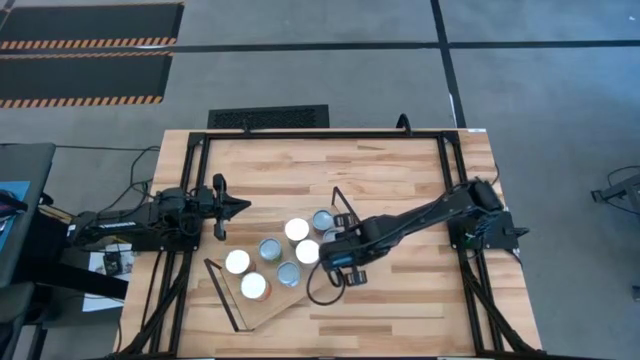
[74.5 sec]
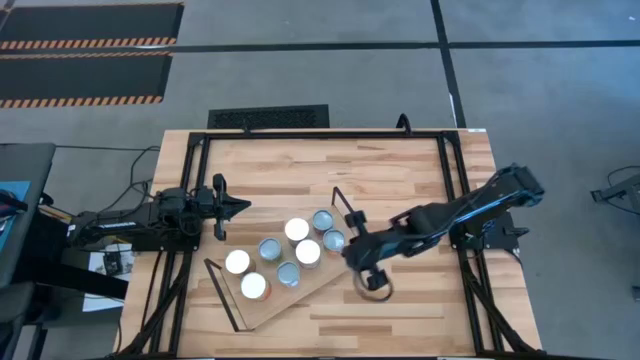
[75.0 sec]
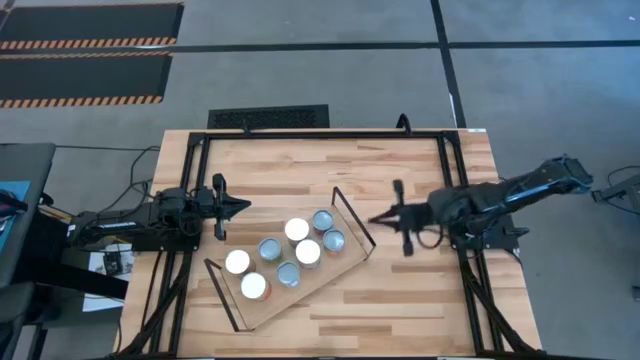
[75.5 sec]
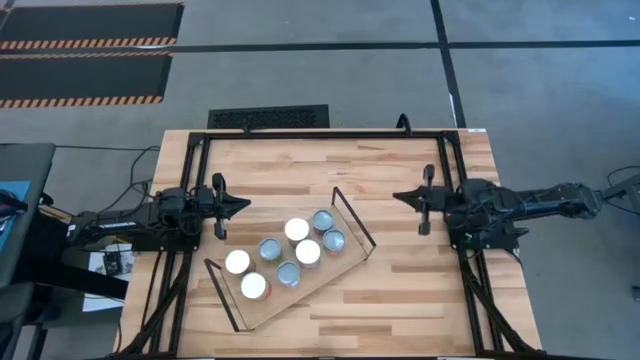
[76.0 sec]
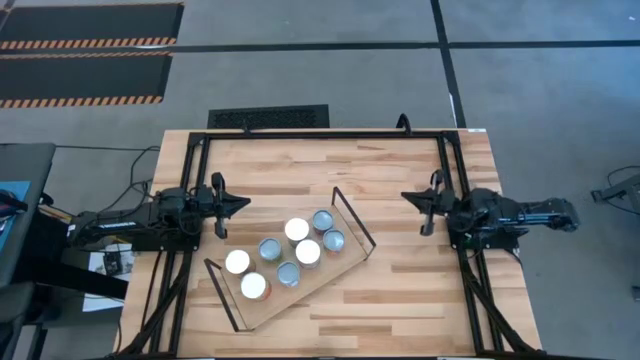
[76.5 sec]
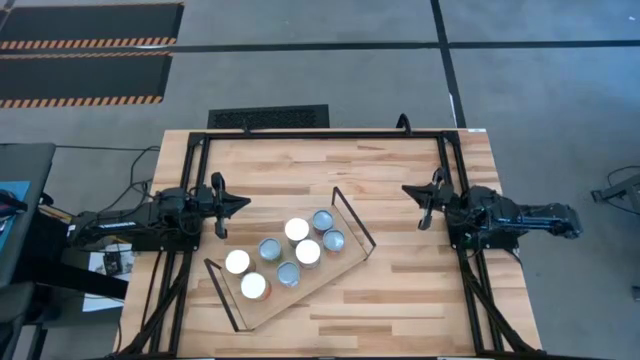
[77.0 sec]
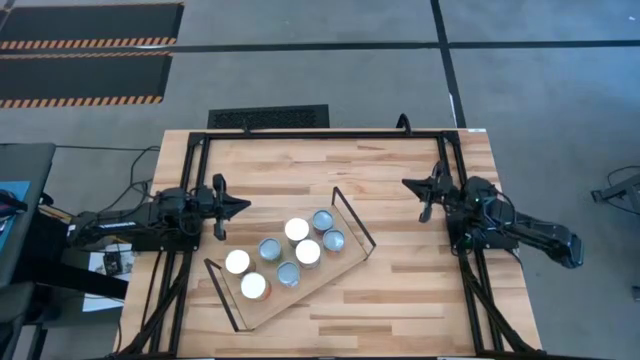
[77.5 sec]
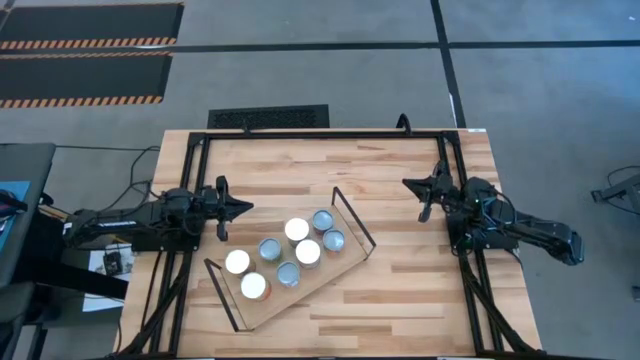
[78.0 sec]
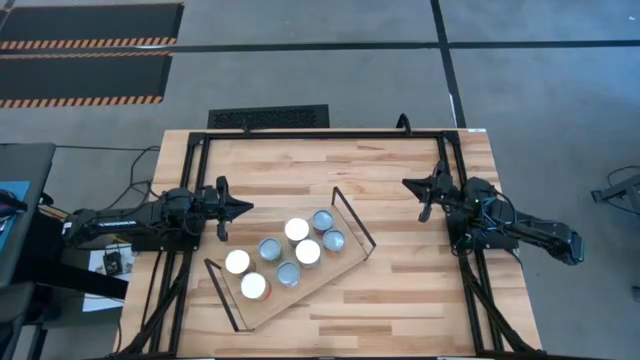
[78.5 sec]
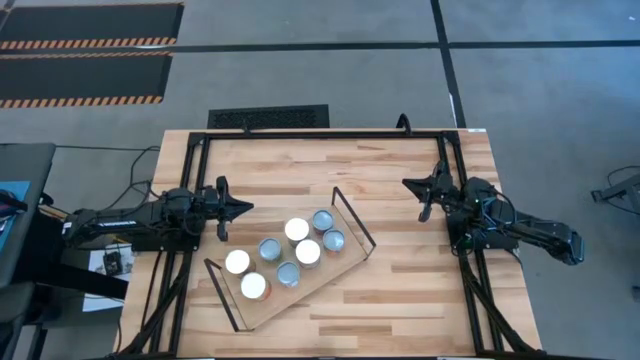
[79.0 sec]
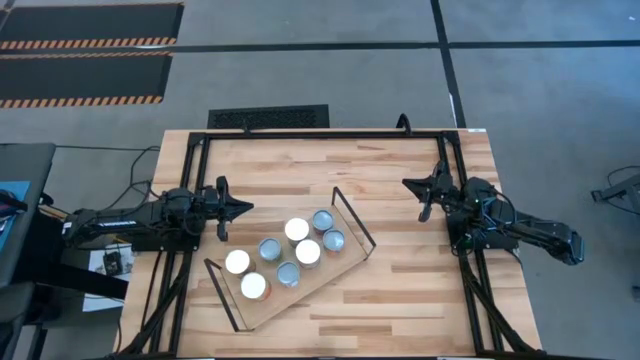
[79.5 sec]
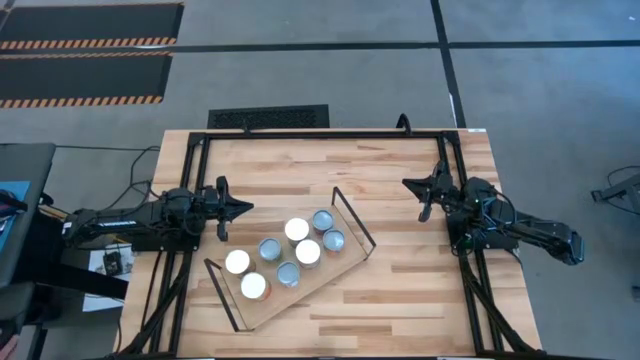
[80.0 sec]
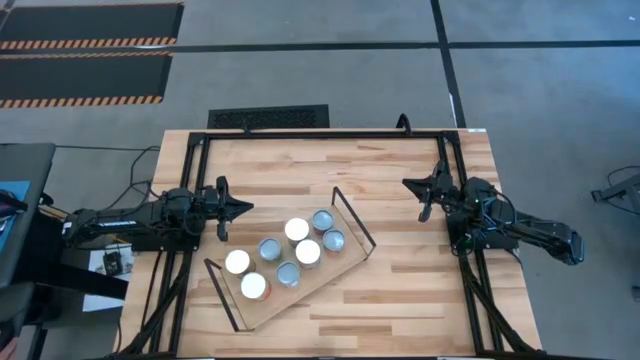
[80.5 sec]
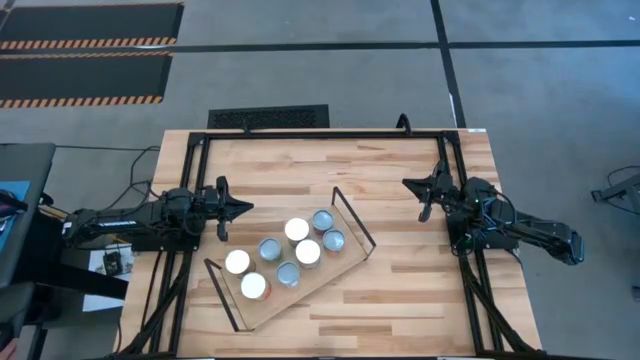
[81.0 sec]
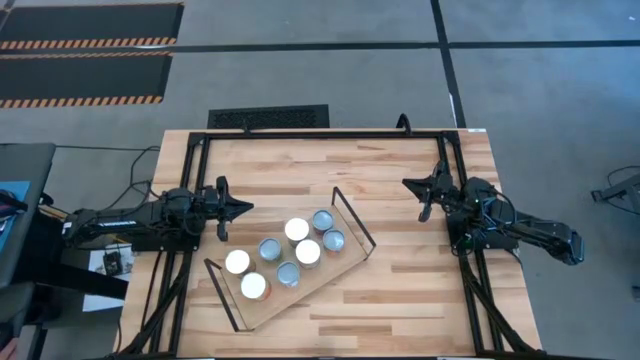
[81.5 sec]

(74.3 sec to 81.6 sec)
Task: Pick and place cans onto a shelf
Return to Home Position

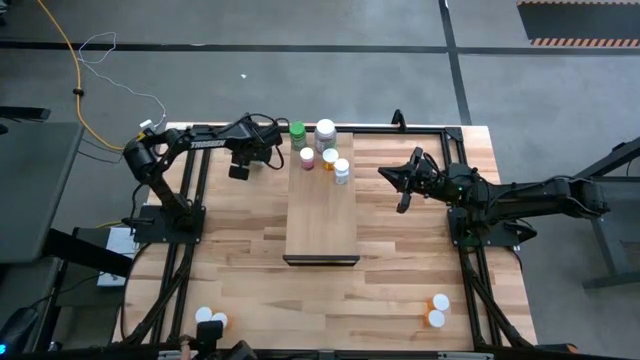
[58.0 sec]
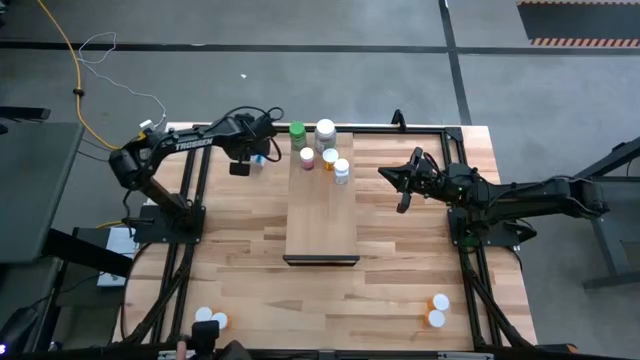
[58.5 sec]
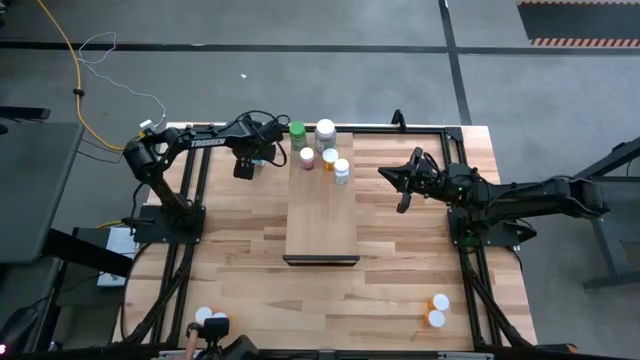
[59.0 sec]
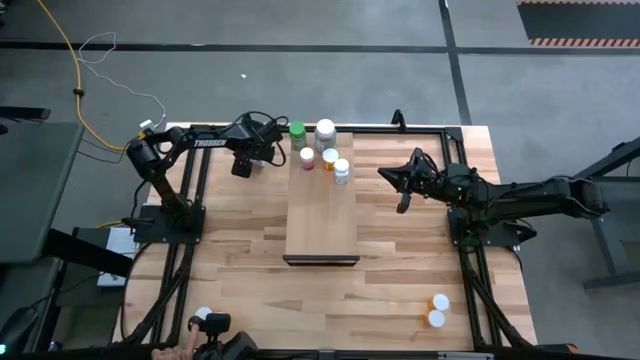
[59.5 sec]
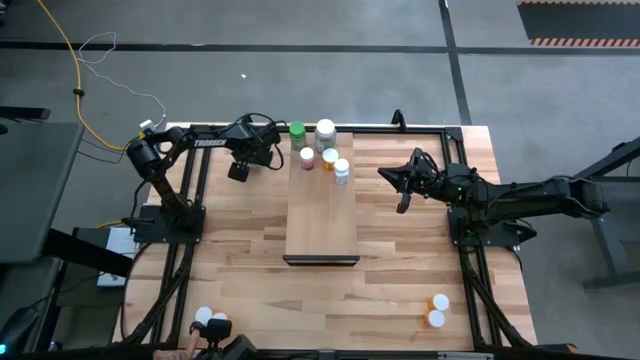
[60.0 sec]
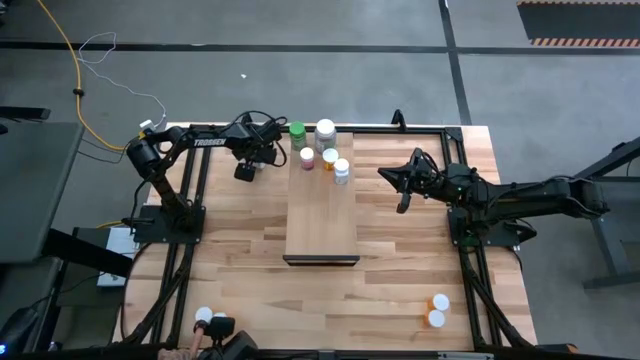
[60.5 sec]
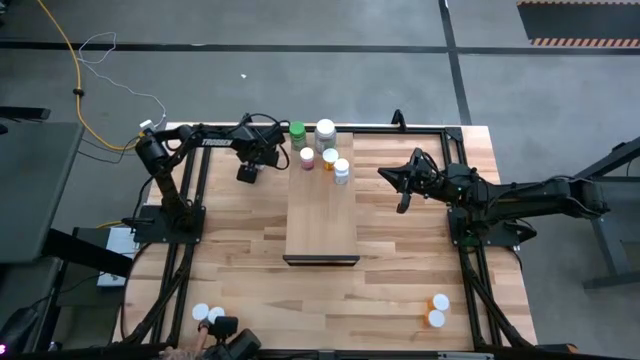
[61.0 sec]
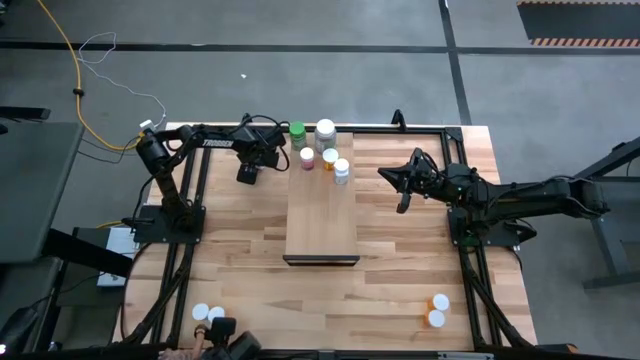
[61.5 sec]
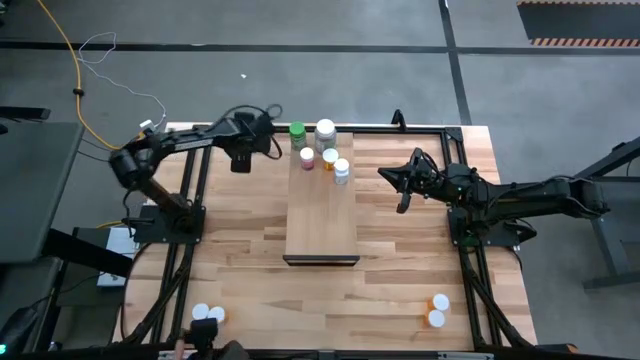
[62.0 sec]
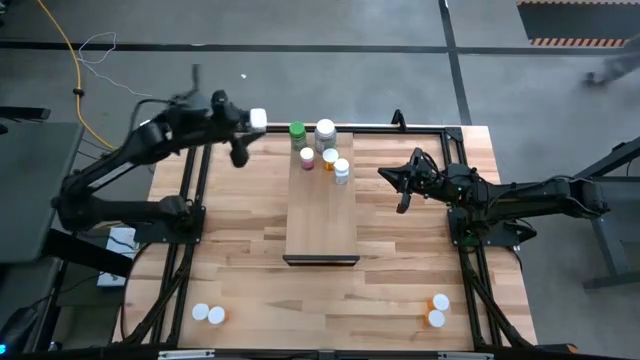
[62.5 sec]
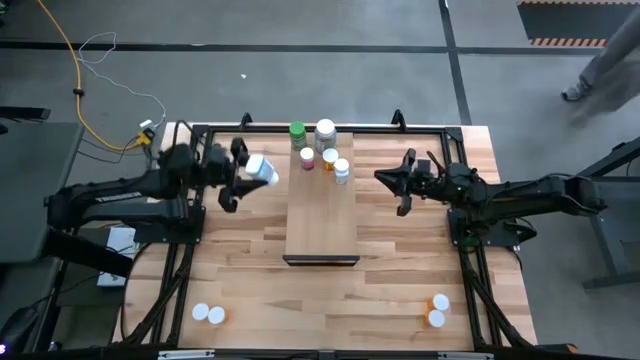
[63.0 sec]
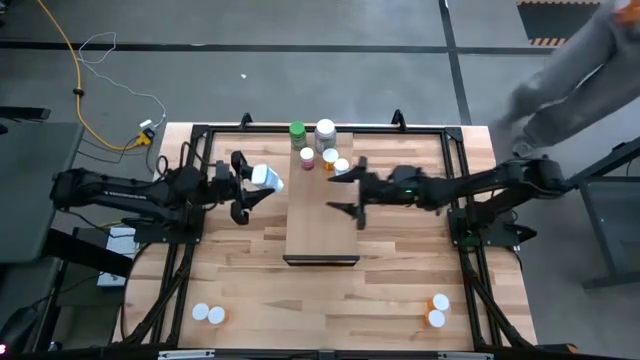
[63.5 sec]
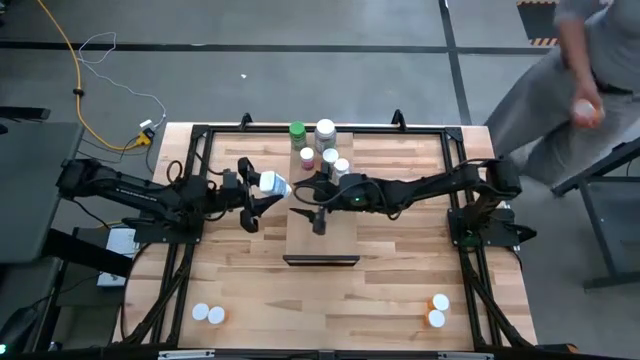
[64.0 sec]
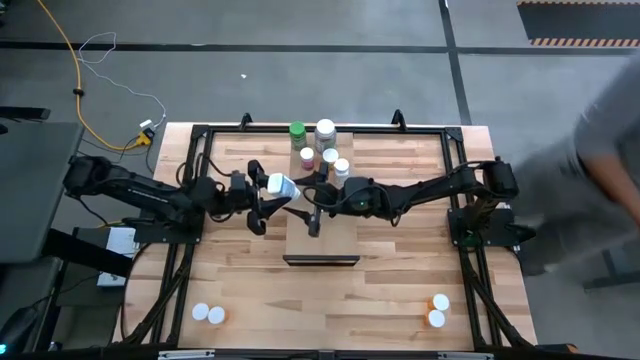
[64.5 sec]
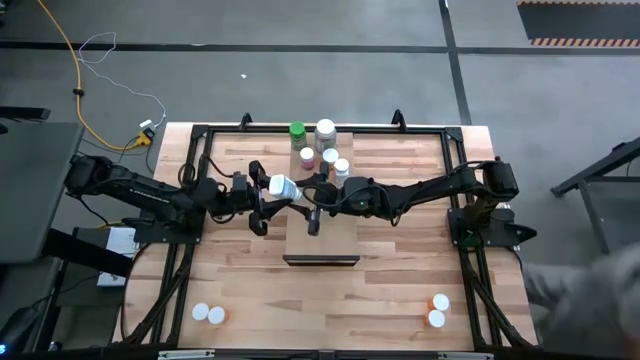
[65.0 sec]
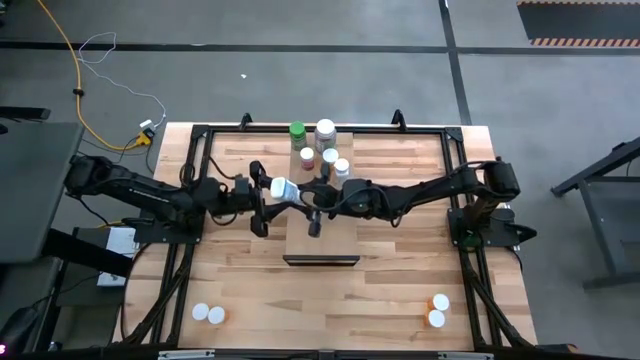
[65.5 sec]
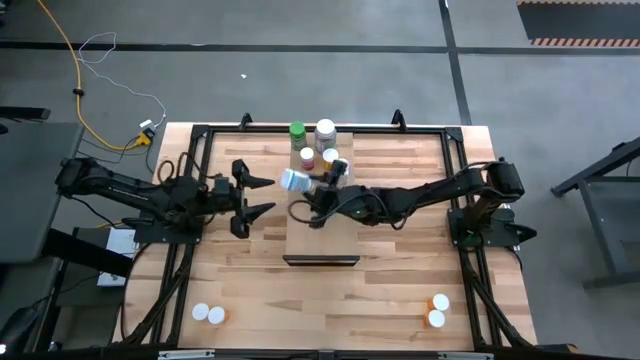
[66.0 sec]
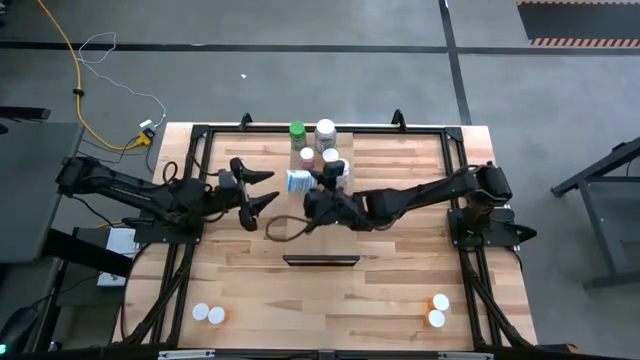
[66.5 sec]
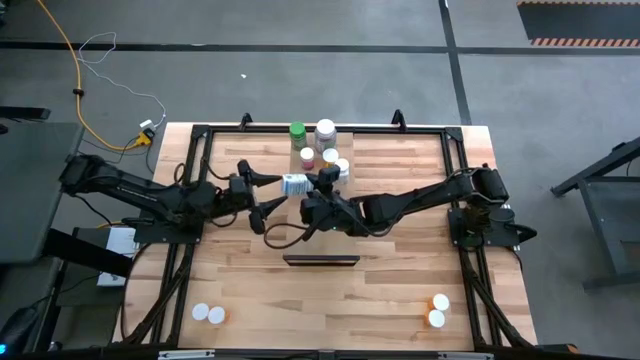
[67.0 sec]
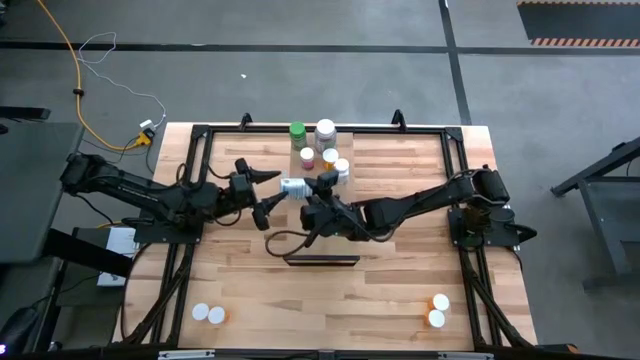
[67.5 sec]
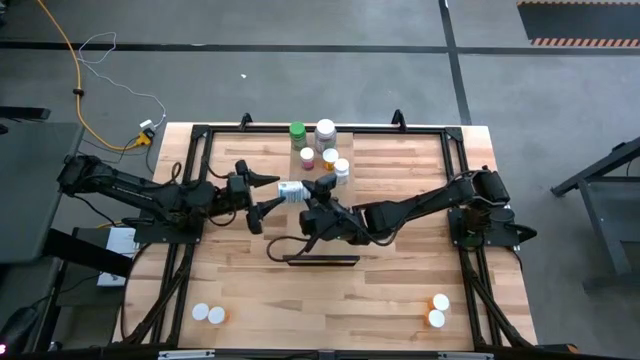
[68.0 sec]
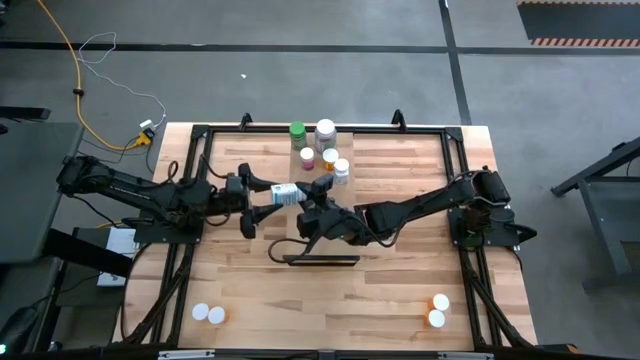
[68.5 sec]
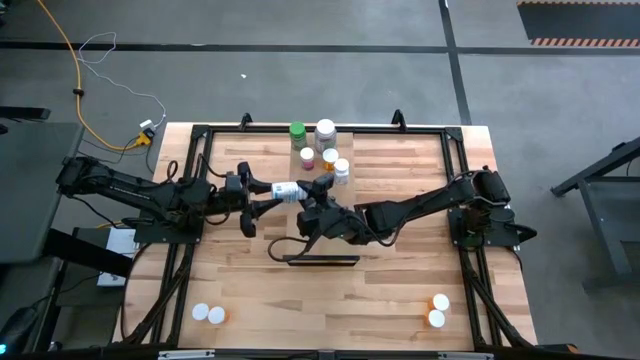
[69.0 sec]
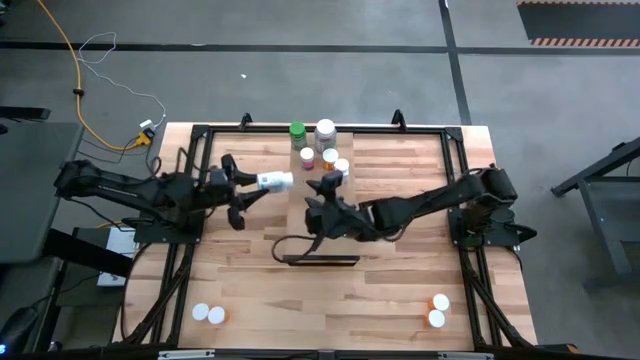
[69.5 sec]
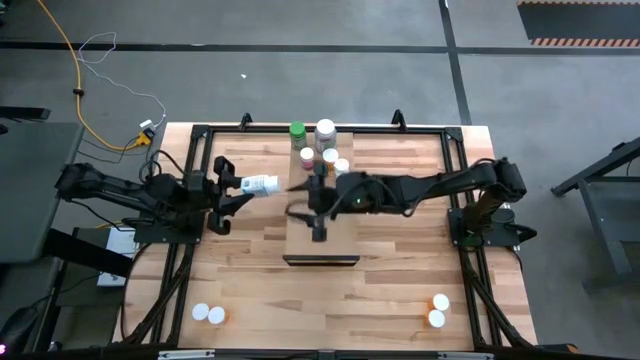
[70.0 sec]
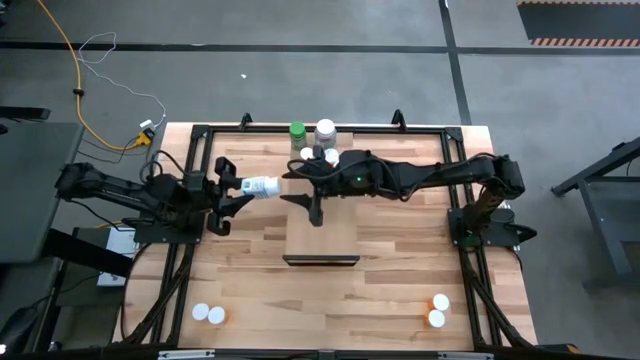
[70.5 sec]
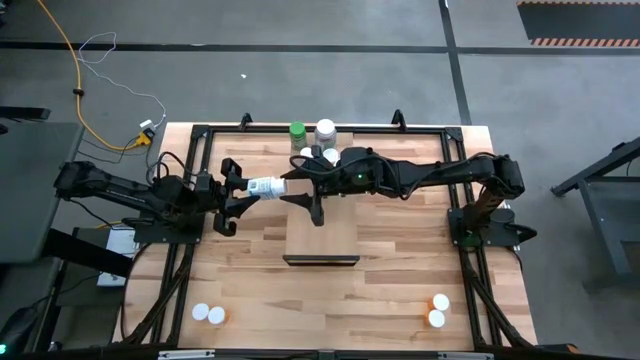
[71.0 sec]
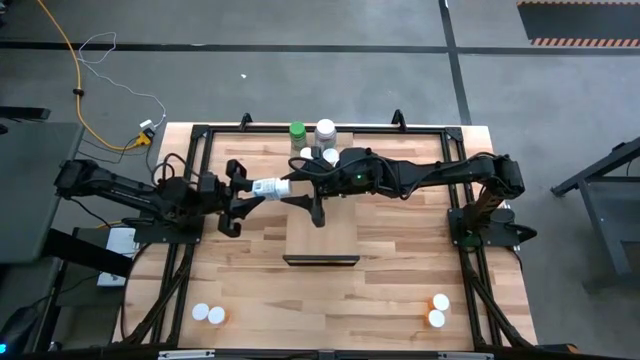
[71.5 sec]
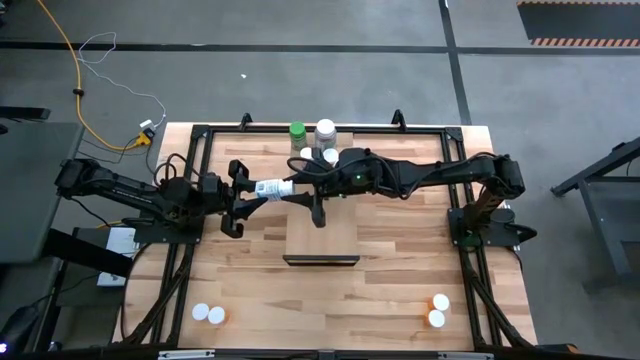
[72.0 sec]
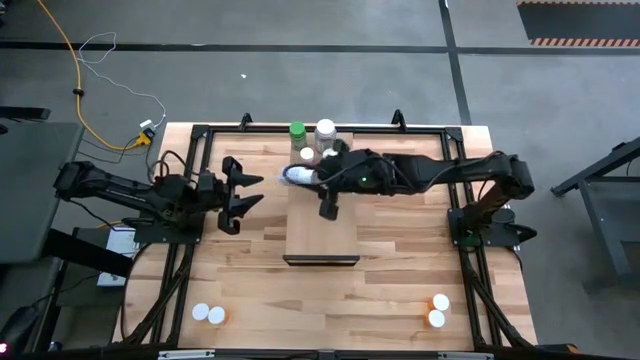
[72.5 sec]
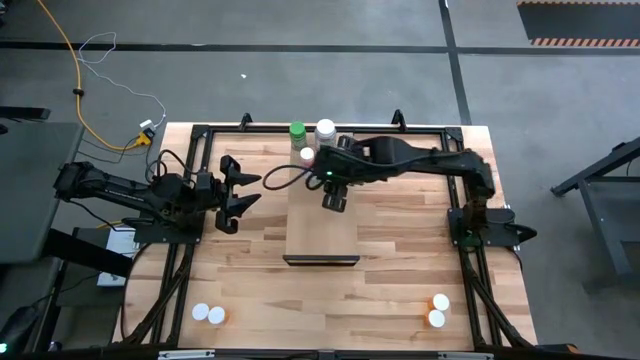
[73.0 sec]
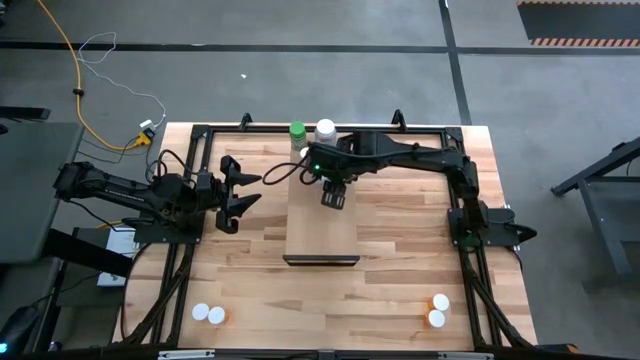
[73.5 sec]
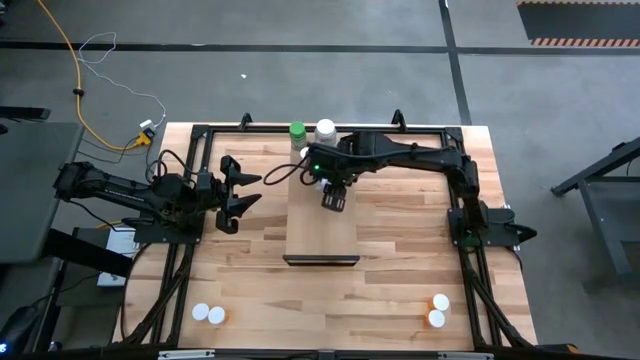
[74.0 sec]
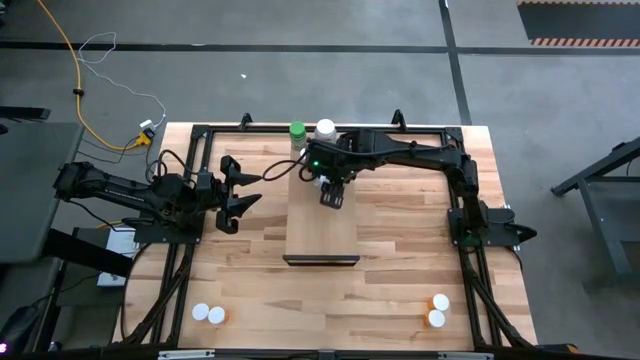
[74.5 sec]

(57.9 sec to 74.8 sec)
Task: Pick and place medicine bottles onto shelf by color
Put the pill bottle on the shelf
